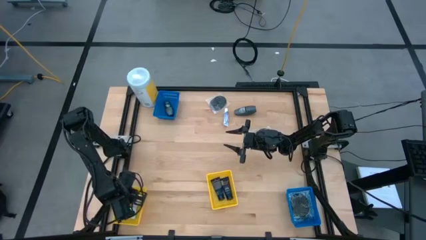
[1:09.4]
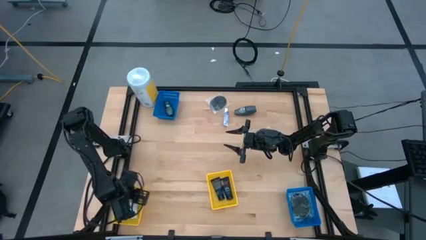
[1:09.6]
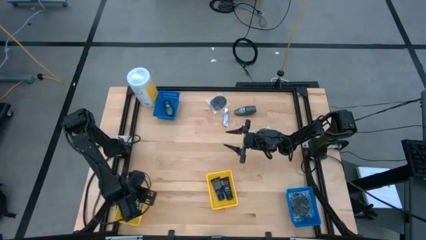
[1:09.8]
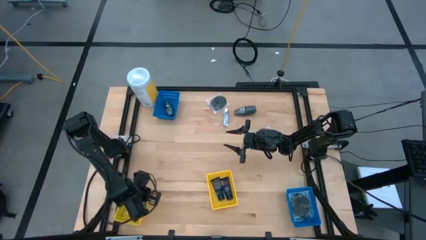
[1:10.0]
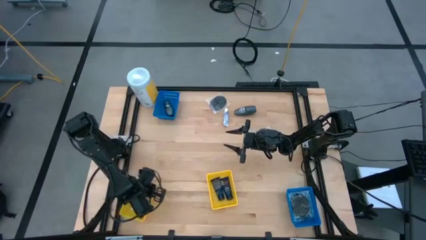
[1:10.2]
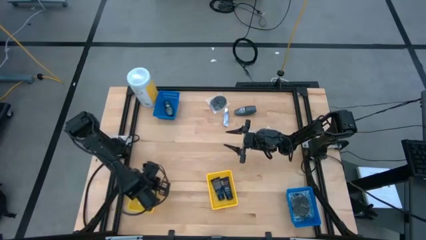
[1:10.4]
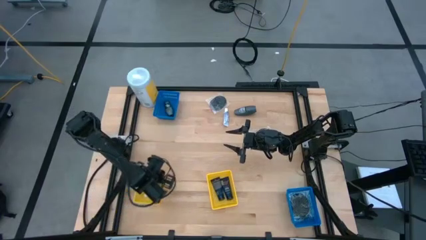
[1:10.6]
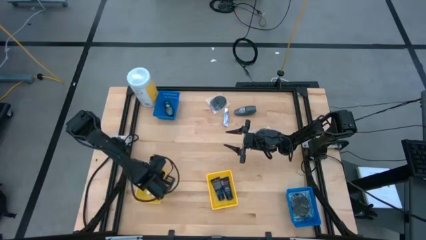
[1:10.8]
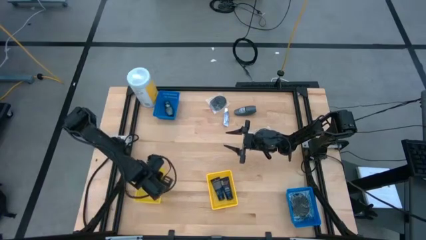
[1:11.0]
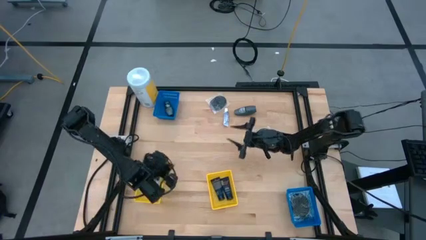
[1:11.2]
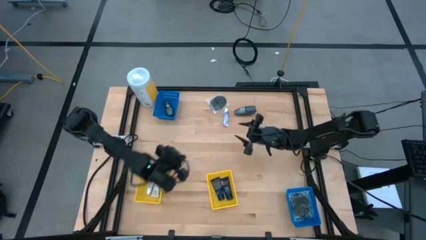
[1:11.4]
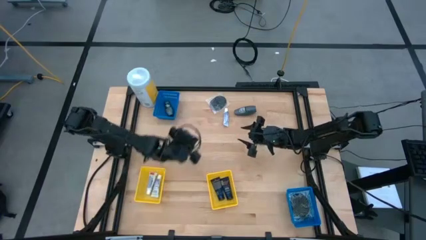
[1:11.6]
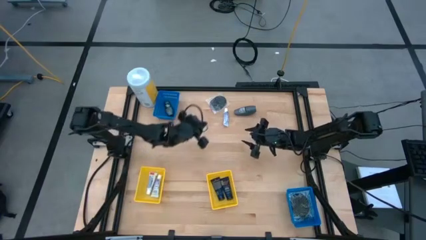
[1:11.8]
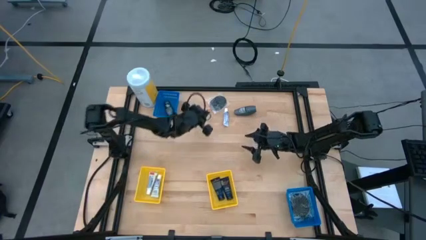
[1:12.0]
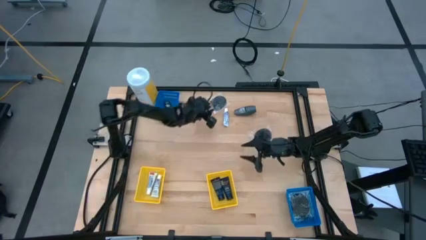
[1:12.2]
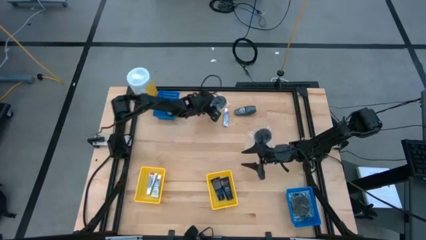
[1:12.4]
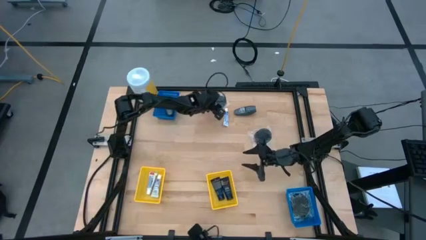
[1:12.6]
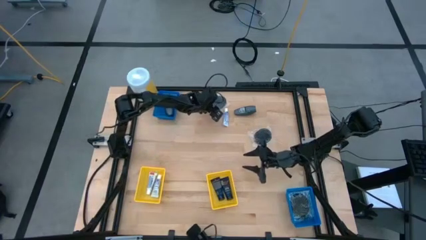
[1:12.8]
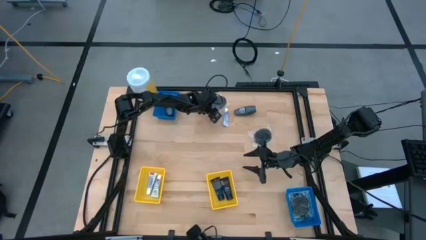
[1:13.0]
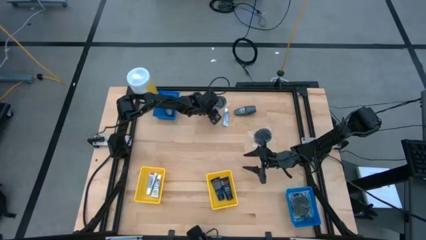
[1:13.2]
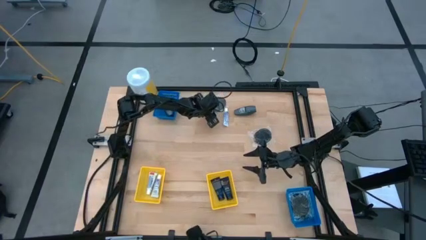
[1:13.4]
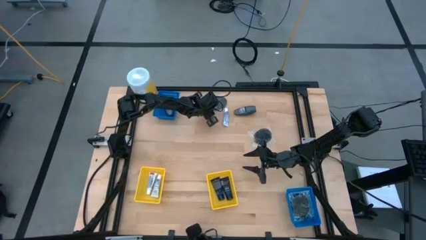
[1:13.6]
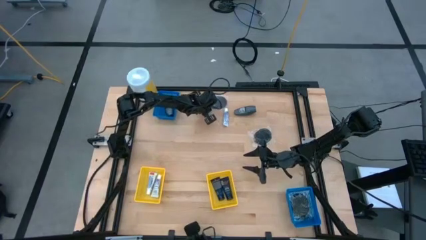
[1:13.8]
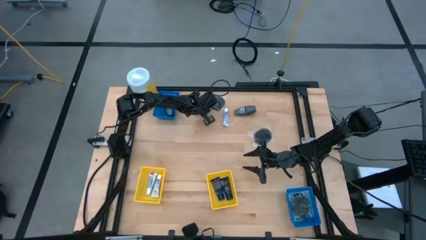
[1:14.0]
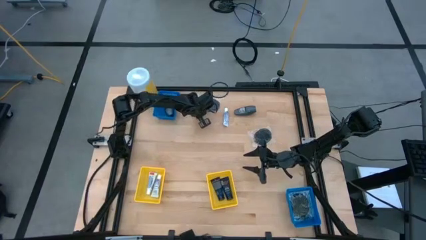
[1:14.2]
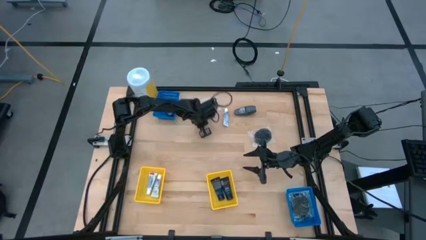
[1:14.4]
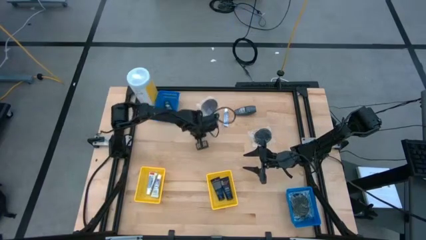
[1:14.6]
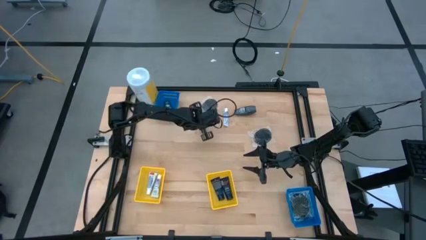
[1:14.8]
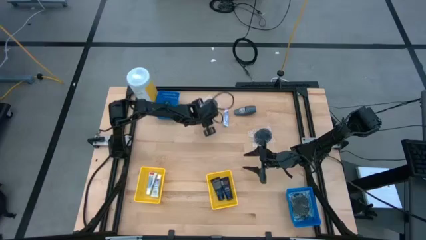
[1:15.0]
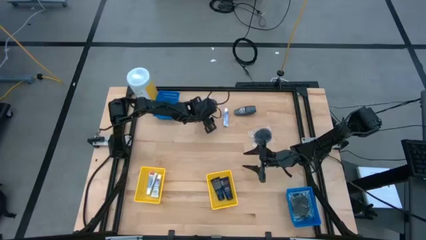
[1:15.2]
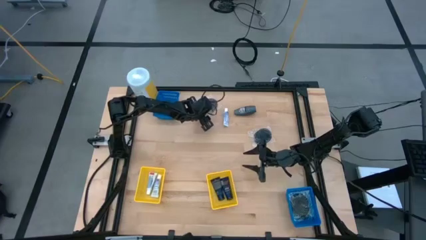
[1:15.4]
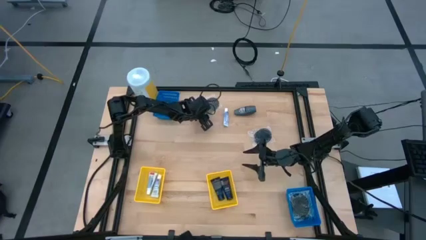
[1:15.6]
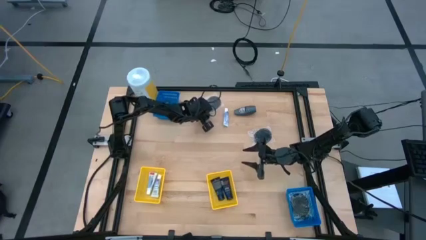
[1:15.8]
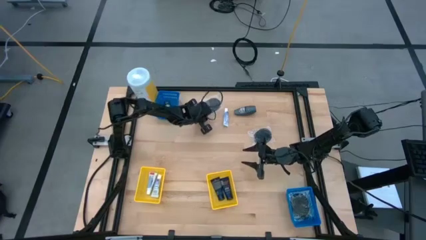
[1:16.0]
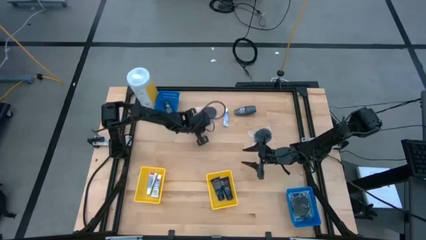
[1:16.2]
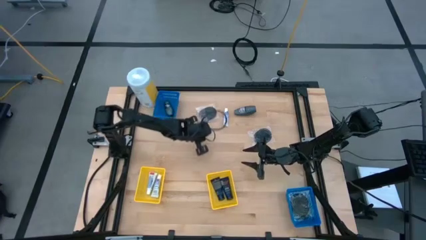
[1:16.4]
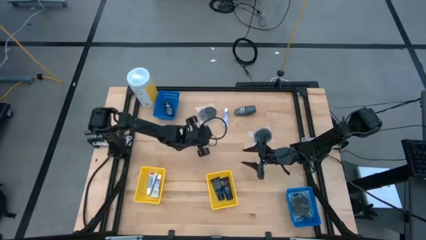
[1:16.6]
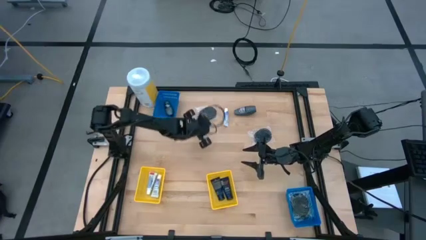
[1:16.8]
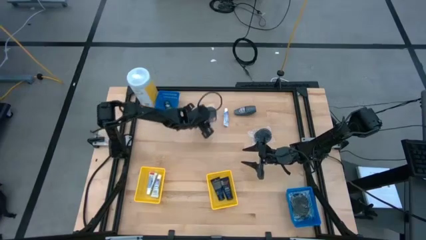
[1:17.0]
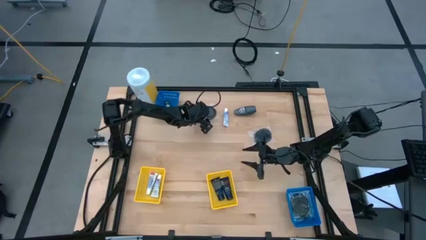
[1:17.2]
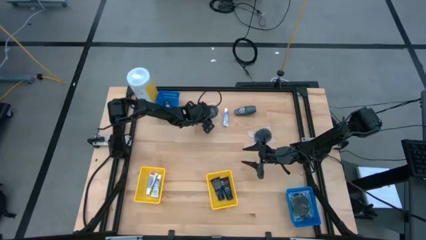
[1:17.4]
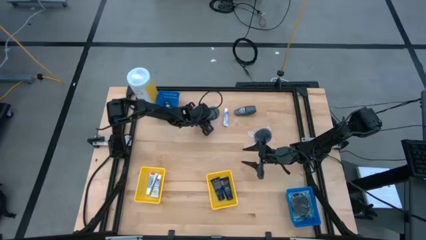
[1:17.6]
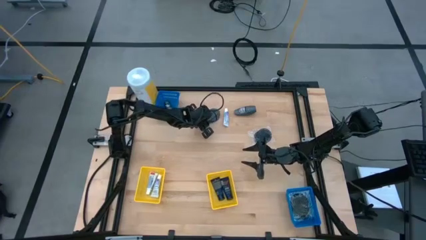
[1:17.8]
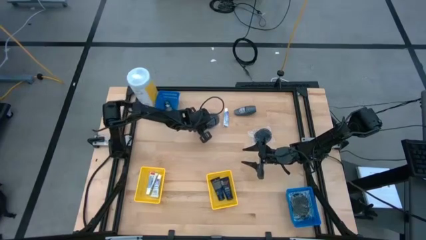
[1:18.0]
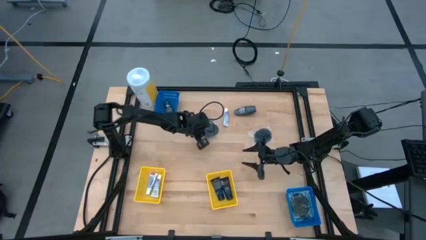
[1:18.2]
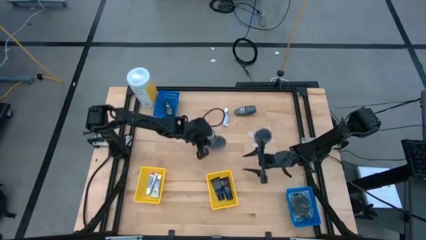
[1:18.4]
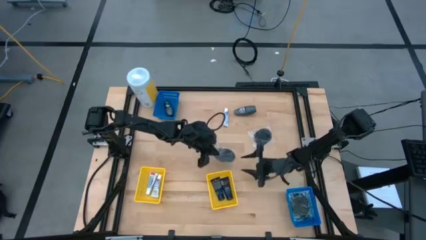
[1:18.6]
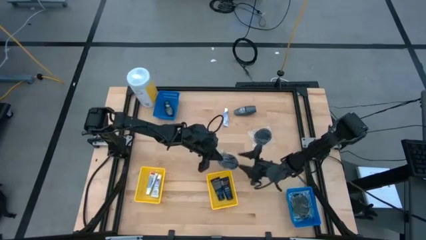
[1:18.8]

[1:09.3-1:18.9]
Task: Pick & Place Travel size toiletries
Put the black hairbrush into the bottom blue bin

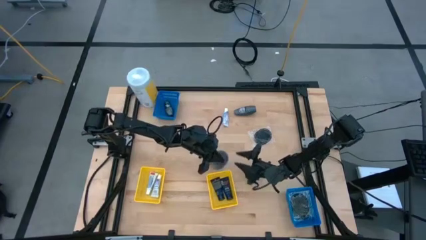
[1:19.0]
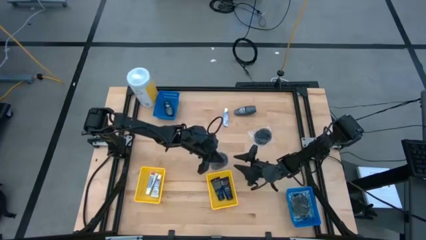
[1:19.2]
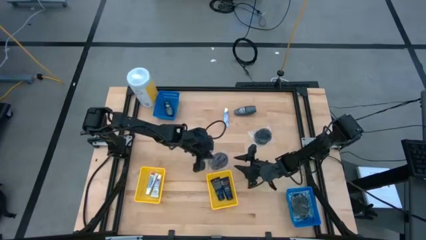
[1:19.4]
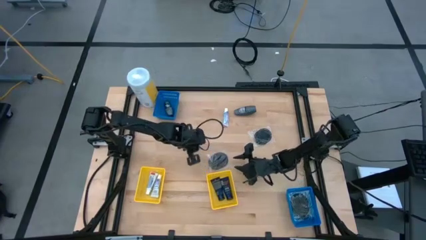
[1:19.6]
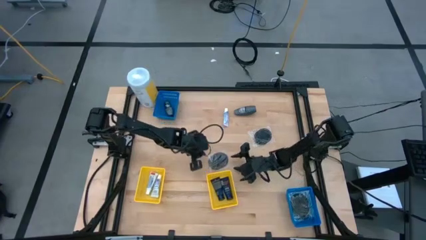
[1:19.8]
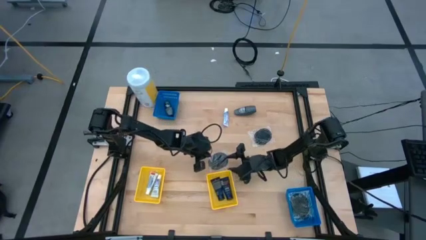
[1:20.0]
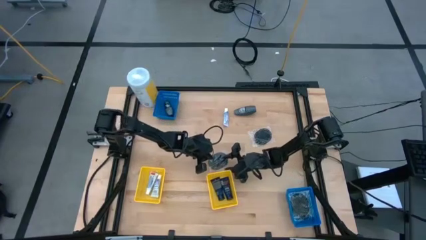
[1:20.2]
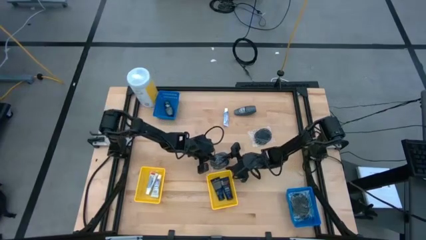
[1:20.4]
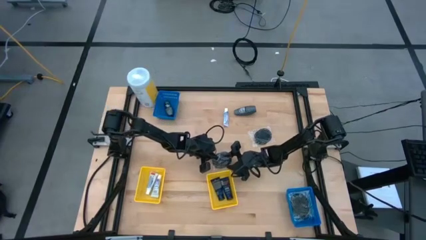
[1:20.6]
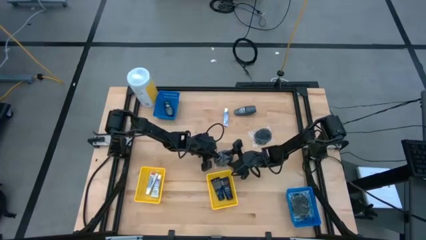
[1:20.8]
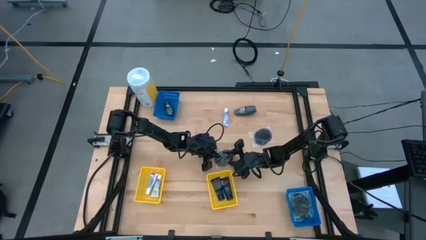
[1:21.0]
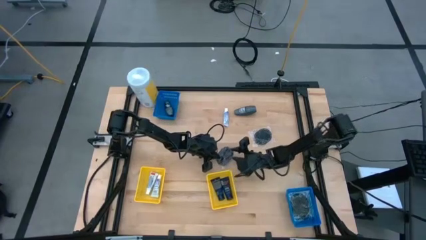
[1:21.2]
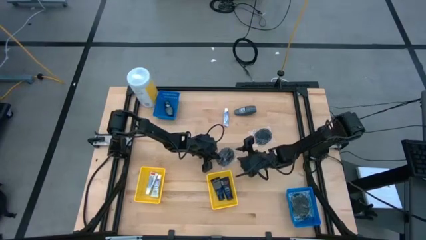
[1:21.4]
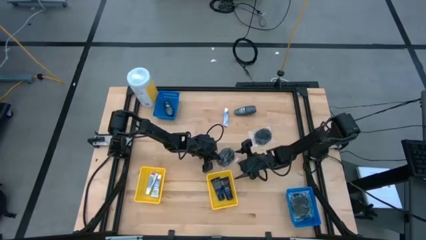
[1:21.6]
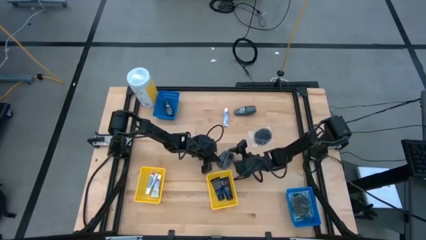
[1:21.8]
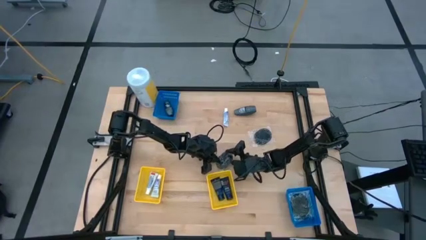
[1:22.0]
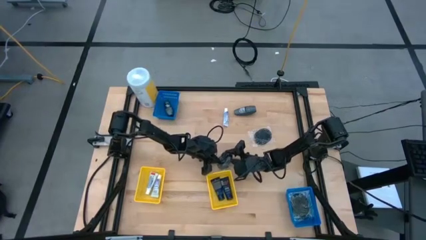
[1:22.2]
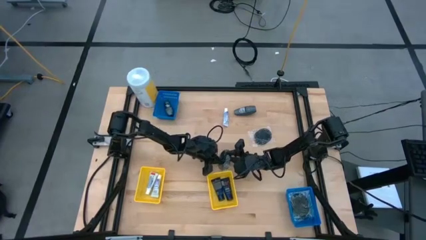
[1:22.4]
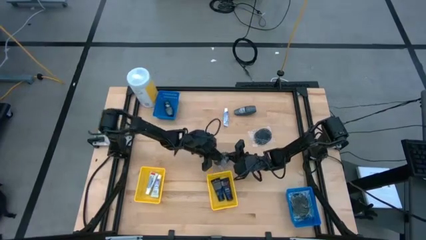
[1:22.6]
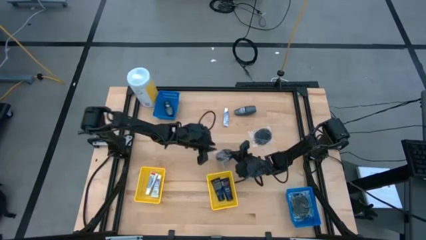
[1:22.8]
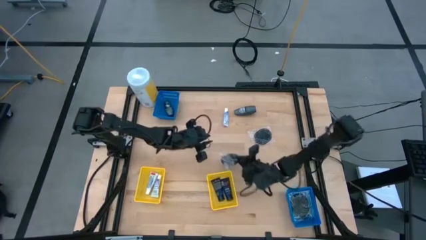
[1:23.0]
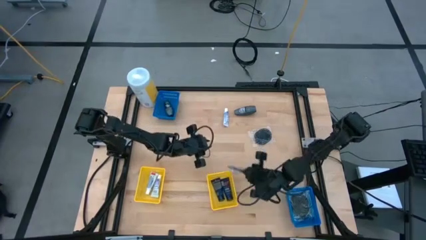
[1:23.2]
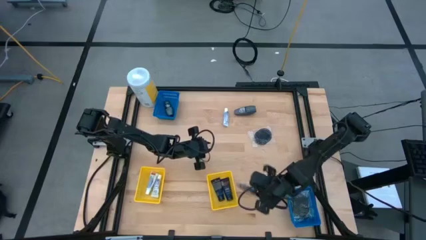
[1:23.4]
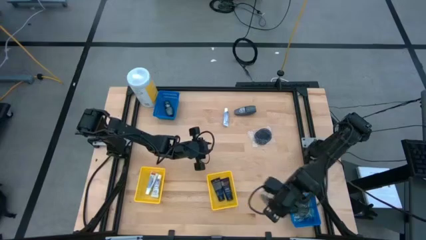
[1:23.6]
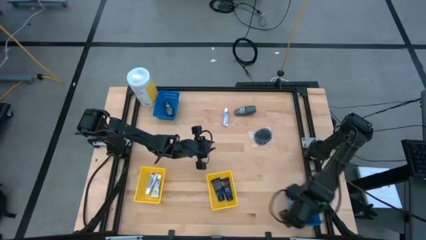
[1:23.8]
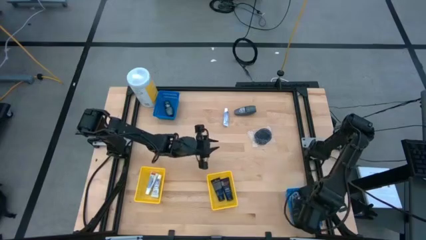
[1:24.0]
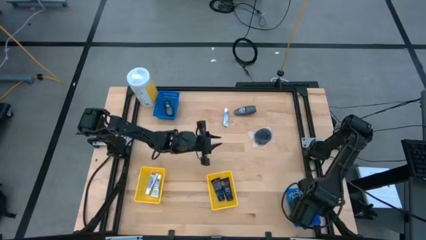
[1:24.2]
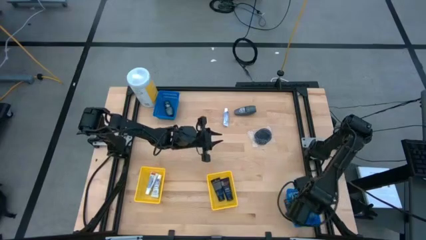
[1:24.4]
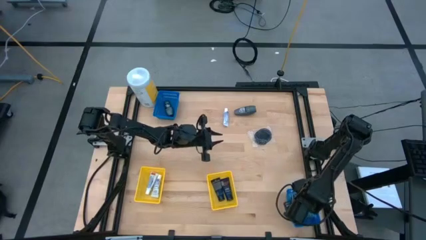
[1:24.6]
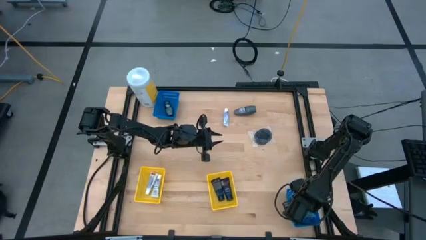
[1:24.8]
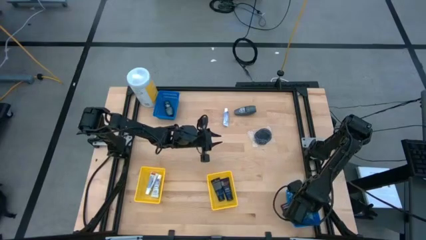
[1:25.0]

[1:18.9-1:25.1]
Put the black hairbrush into the bottom blue bin

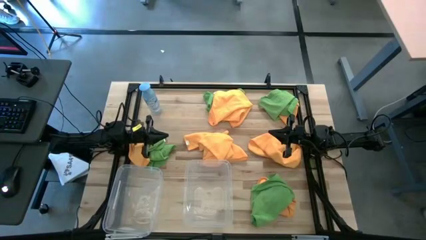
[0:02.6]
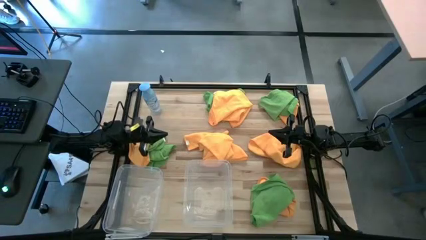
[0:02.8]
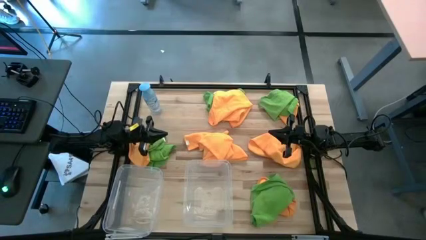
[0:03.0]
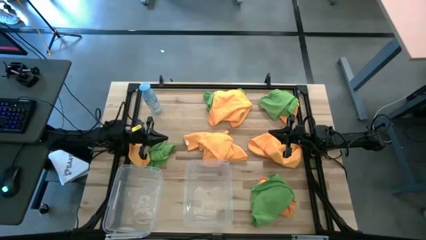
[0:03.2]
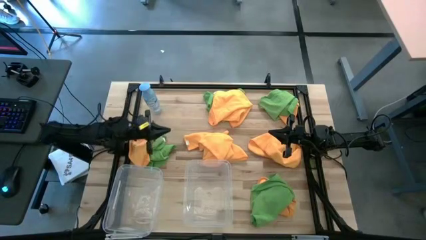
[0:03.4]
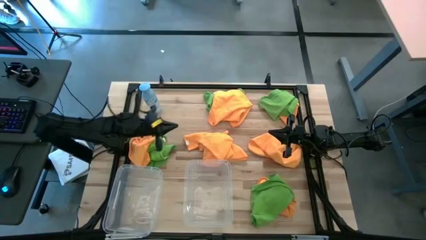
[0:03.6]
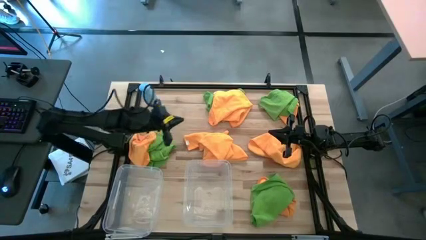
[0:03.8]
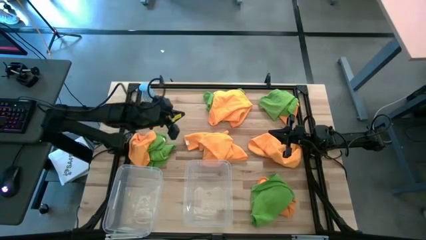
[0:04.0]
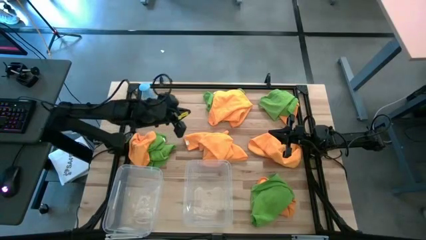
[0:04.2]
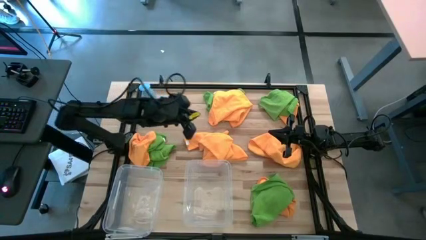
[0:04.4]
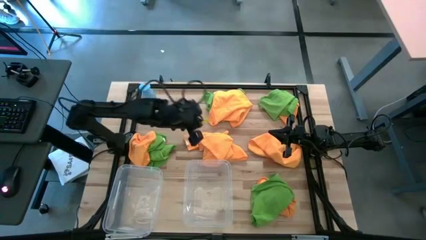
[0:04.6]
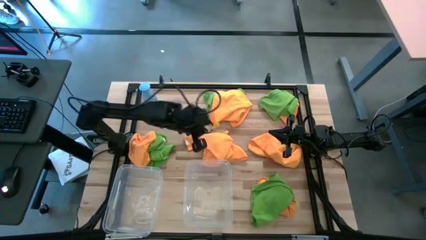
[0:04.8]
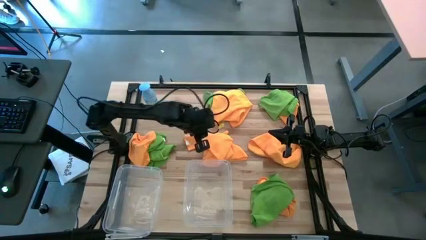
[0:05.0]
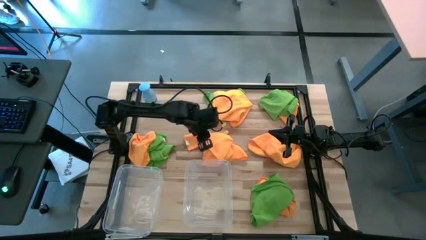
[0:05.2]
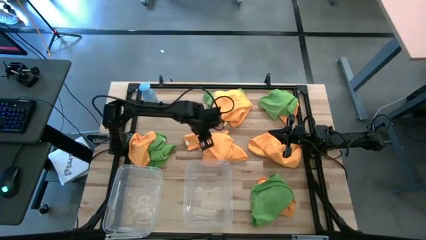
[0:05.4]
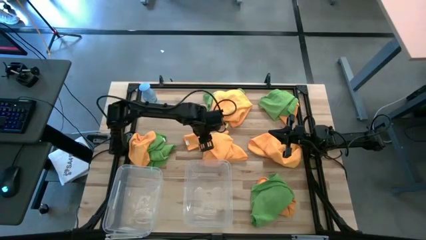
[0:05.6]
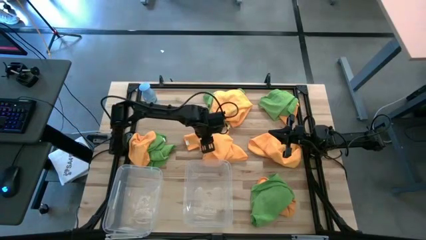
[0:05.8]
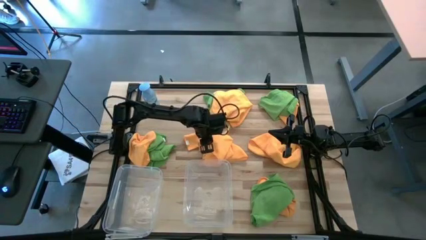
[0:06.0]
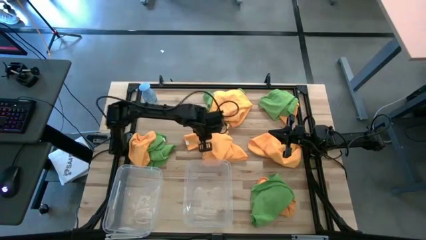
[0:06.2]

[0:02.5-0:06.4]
Task: Sort microfiber towel by color & place in baskets
Put the orange towel into the right transparent bin
